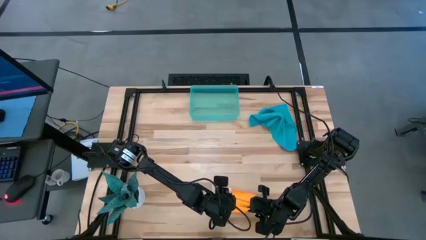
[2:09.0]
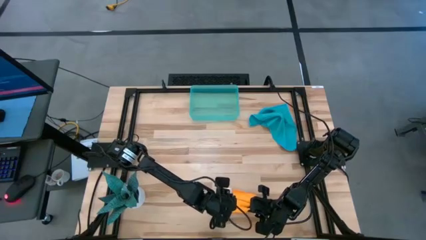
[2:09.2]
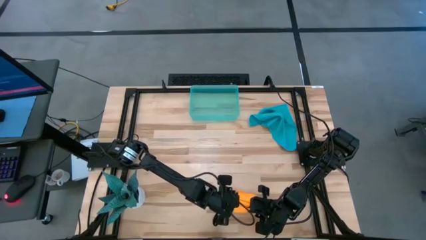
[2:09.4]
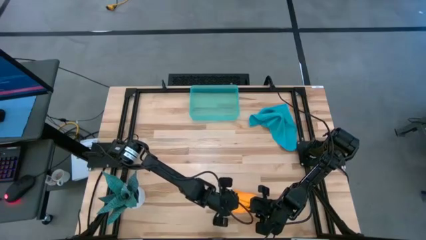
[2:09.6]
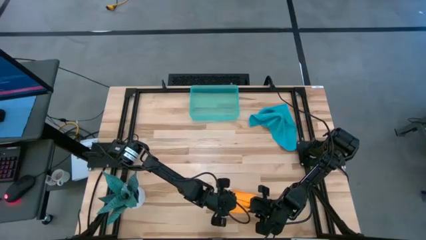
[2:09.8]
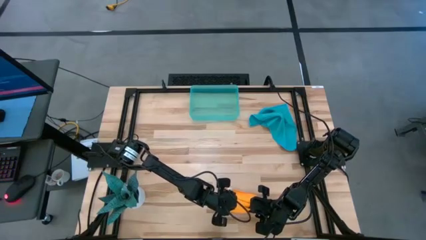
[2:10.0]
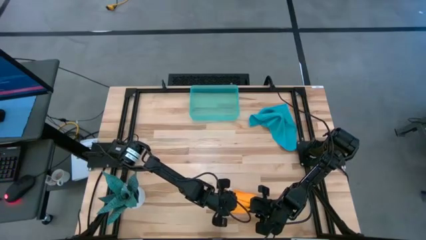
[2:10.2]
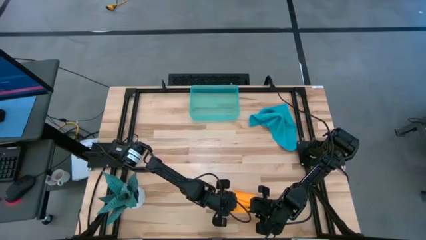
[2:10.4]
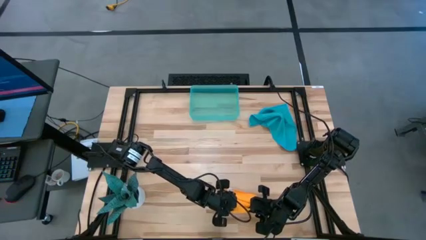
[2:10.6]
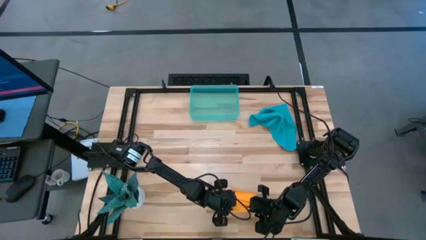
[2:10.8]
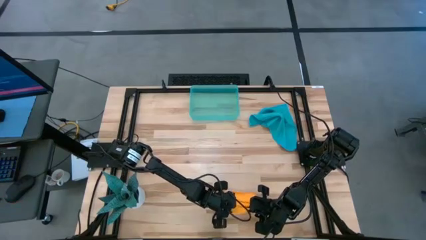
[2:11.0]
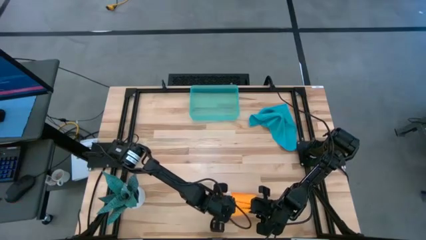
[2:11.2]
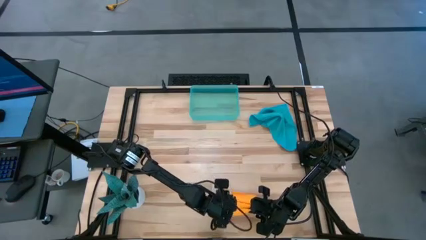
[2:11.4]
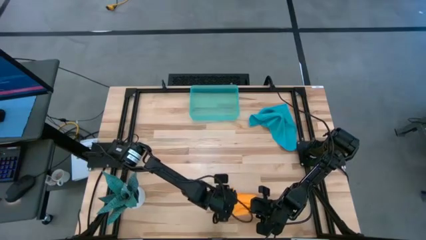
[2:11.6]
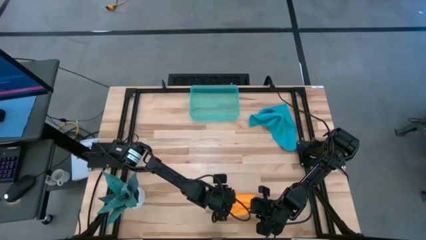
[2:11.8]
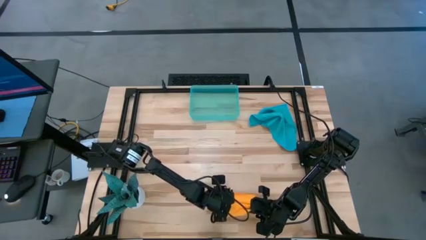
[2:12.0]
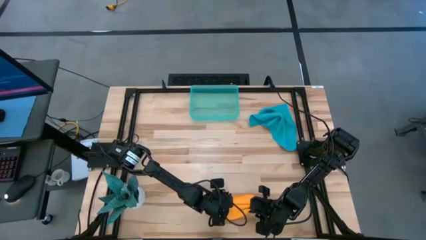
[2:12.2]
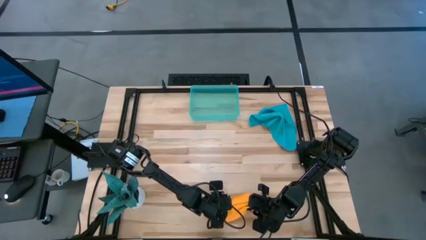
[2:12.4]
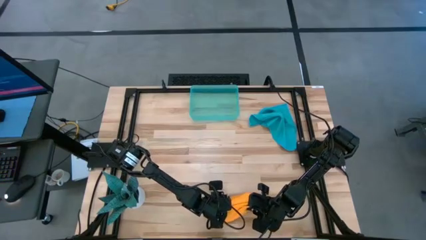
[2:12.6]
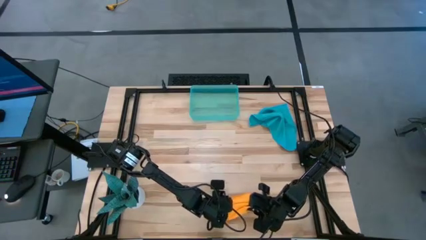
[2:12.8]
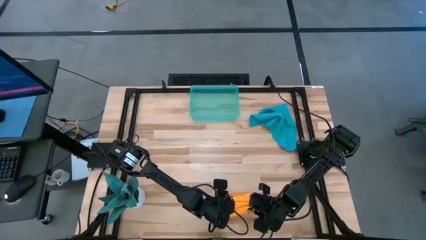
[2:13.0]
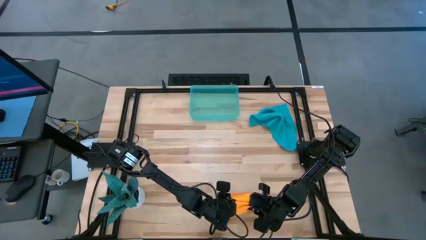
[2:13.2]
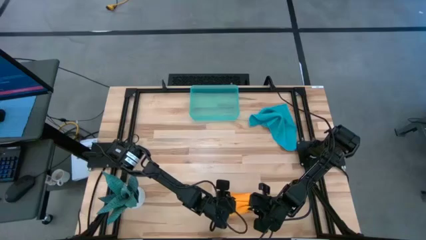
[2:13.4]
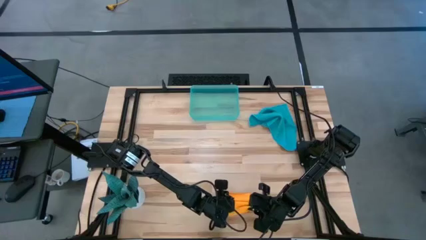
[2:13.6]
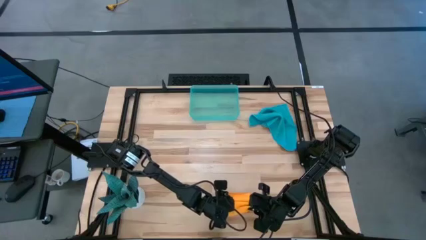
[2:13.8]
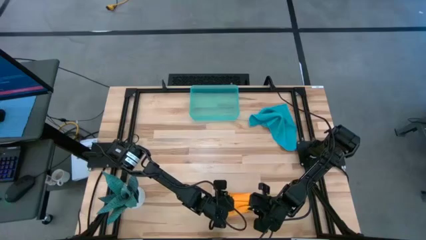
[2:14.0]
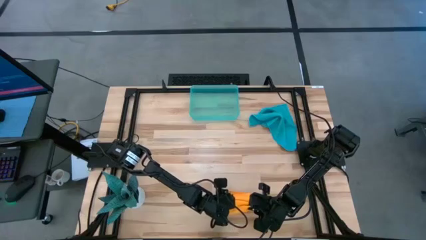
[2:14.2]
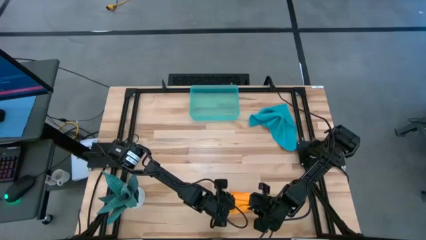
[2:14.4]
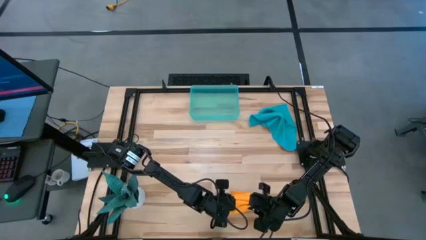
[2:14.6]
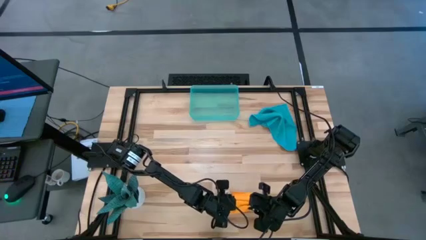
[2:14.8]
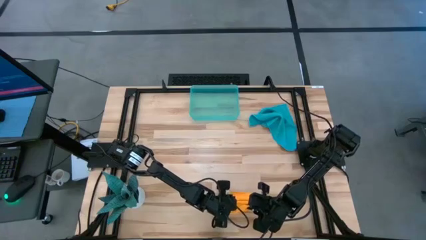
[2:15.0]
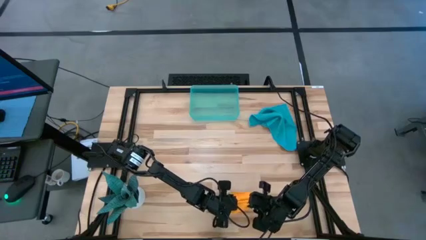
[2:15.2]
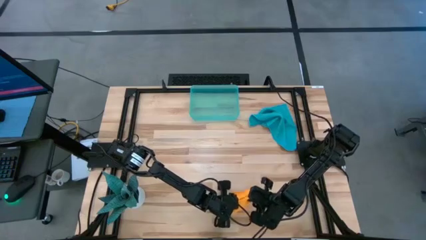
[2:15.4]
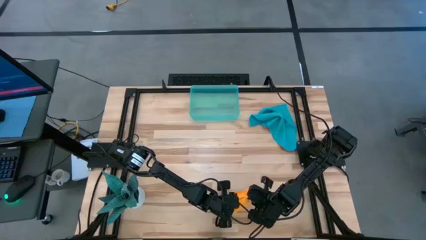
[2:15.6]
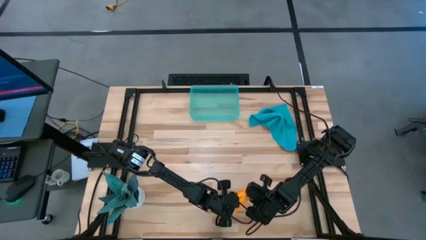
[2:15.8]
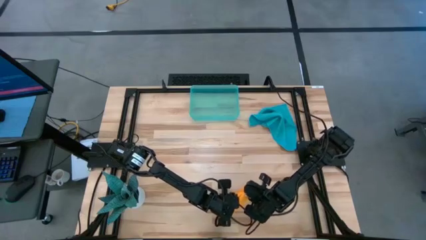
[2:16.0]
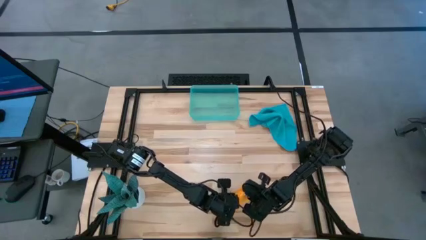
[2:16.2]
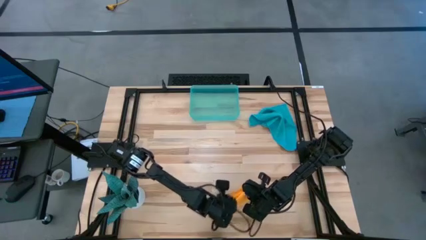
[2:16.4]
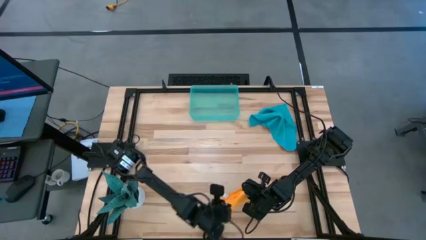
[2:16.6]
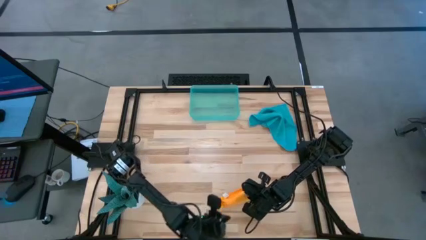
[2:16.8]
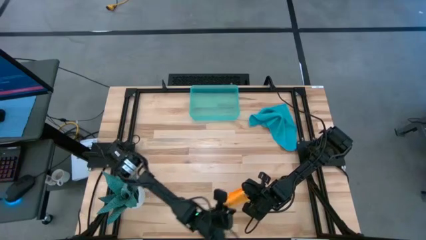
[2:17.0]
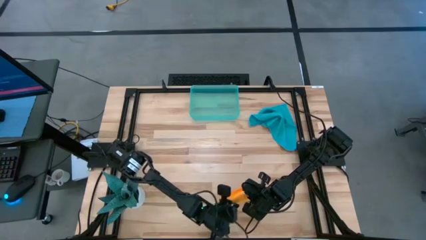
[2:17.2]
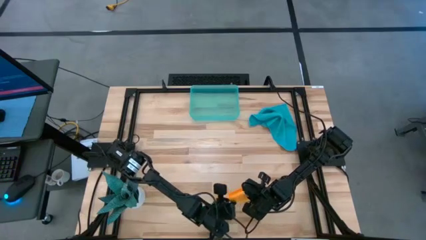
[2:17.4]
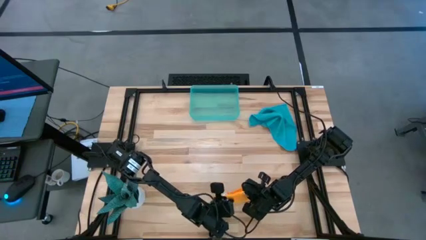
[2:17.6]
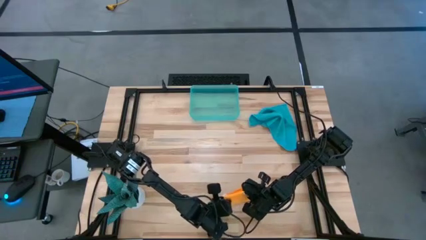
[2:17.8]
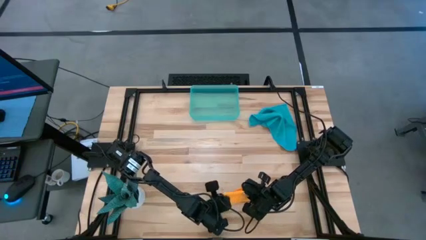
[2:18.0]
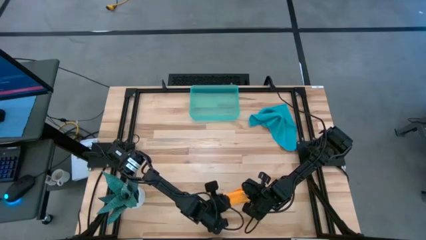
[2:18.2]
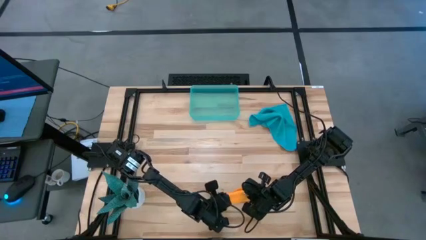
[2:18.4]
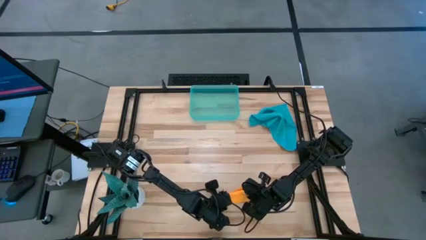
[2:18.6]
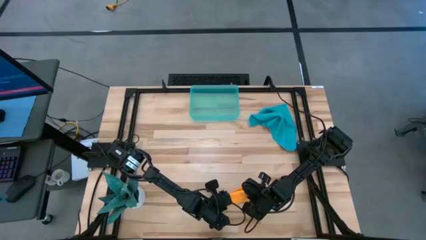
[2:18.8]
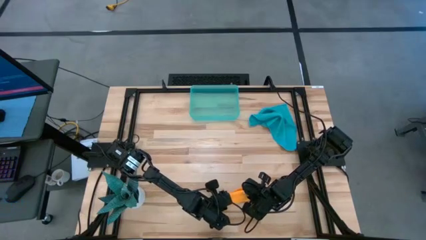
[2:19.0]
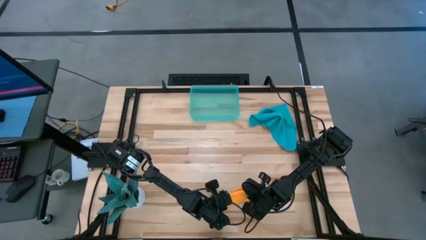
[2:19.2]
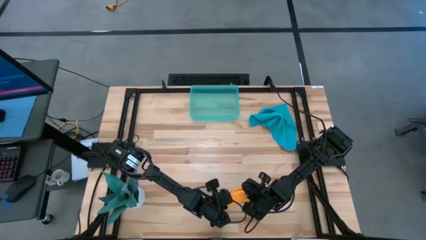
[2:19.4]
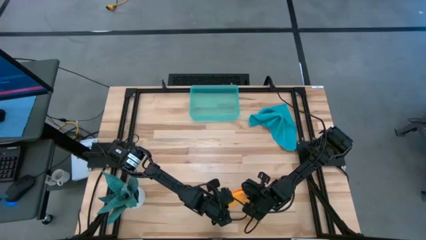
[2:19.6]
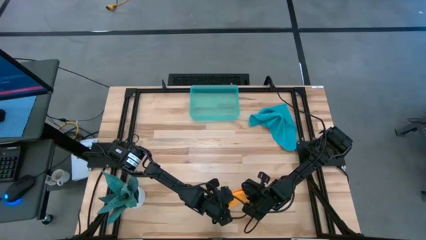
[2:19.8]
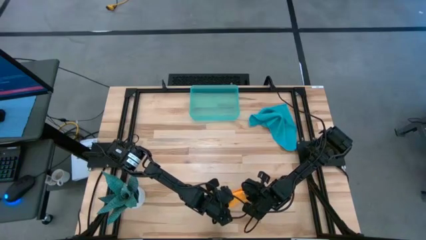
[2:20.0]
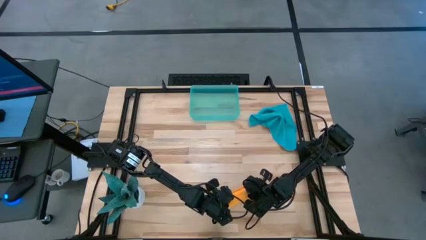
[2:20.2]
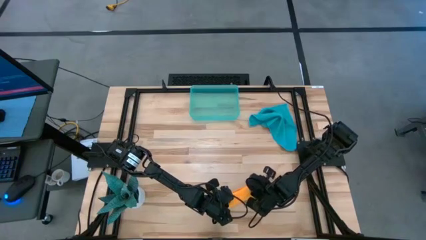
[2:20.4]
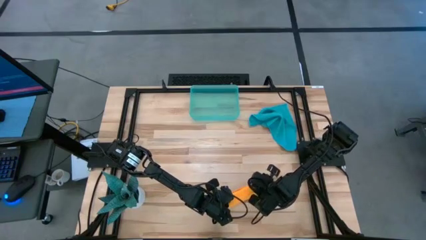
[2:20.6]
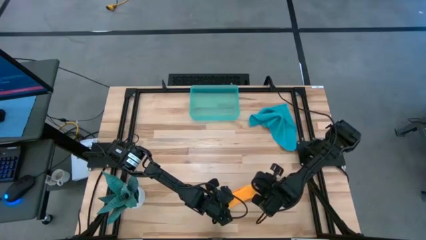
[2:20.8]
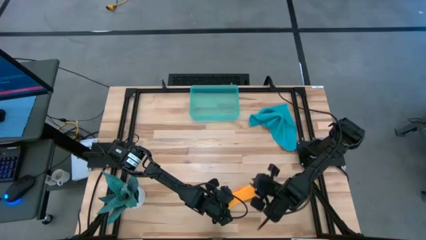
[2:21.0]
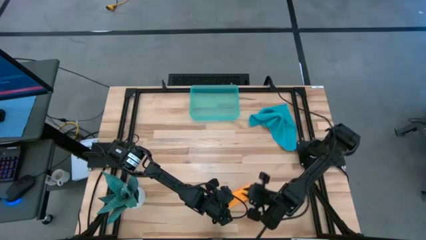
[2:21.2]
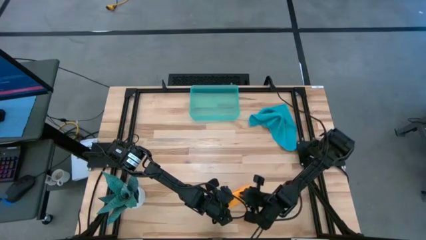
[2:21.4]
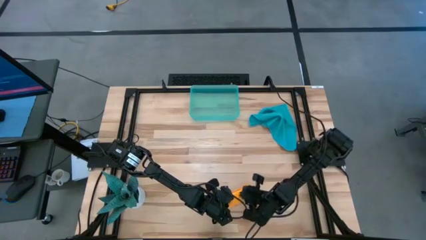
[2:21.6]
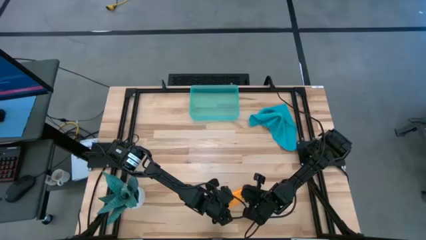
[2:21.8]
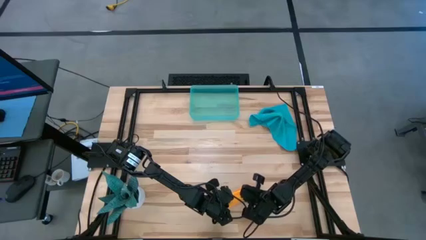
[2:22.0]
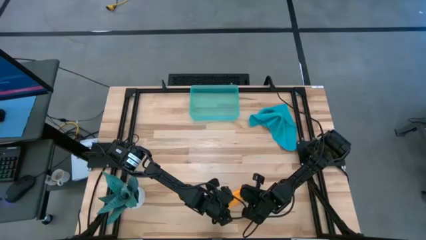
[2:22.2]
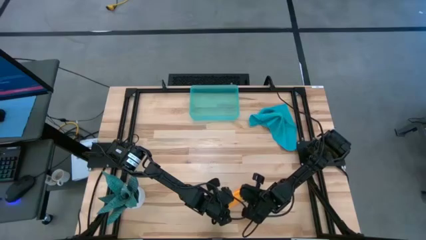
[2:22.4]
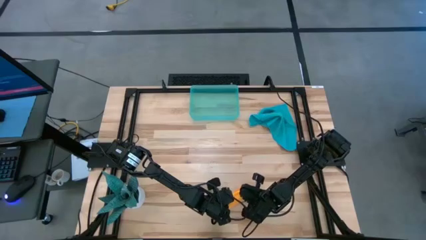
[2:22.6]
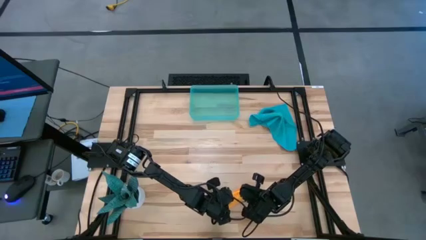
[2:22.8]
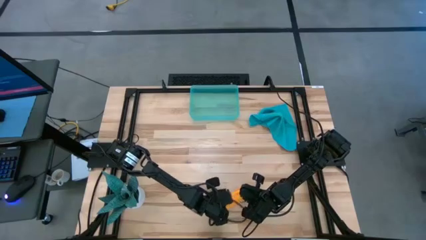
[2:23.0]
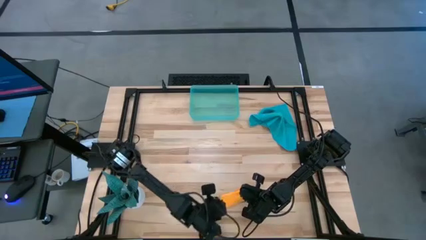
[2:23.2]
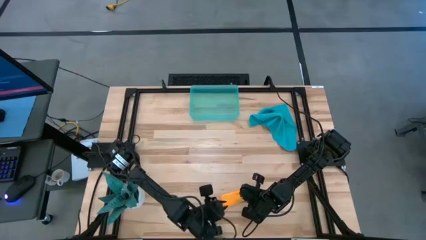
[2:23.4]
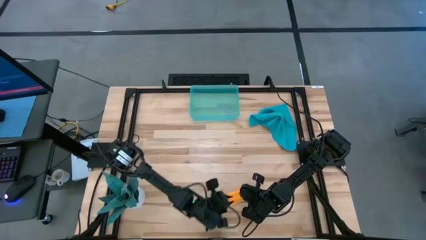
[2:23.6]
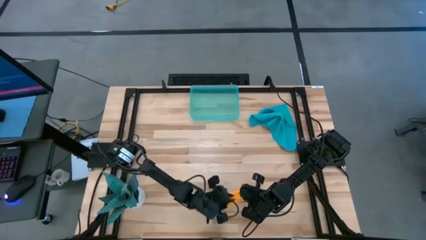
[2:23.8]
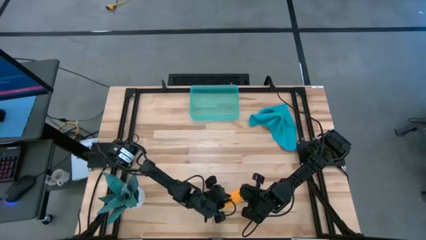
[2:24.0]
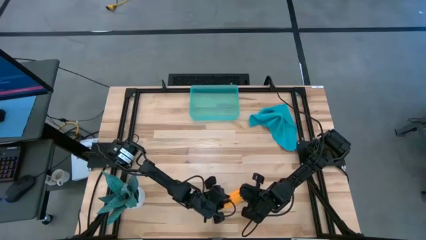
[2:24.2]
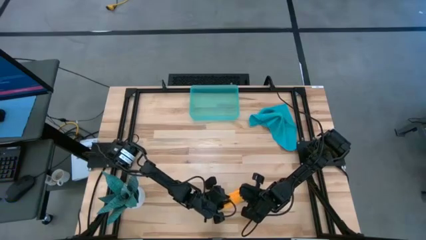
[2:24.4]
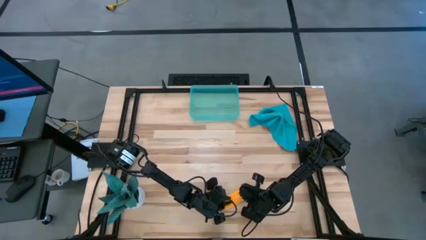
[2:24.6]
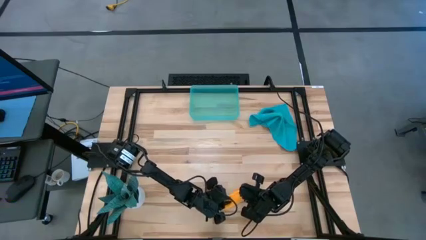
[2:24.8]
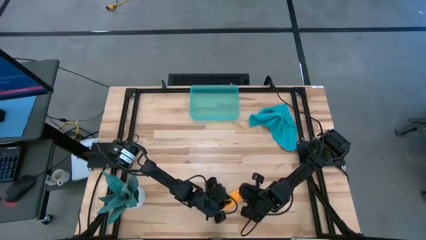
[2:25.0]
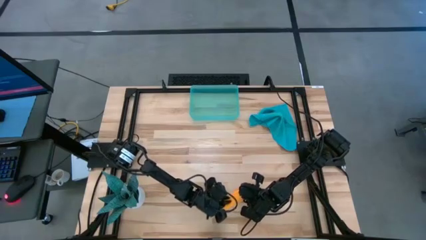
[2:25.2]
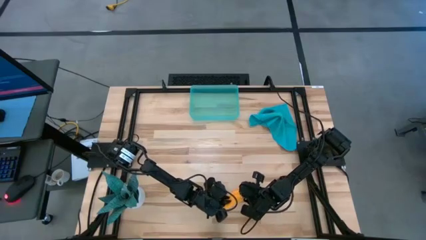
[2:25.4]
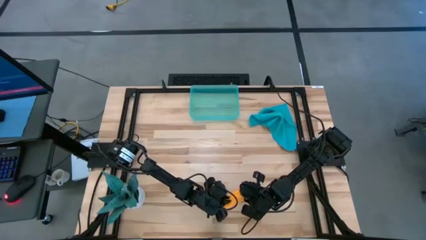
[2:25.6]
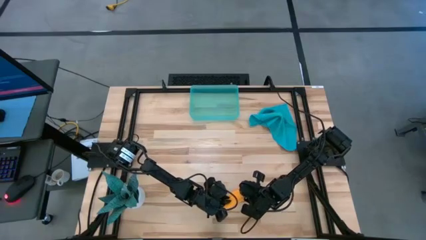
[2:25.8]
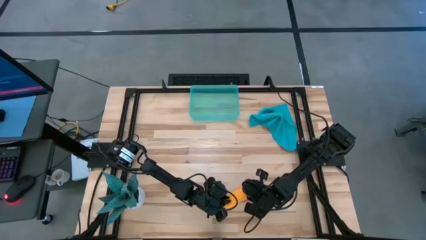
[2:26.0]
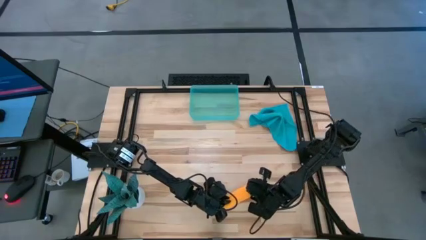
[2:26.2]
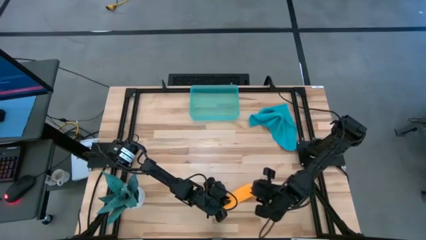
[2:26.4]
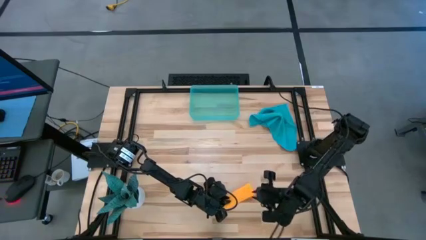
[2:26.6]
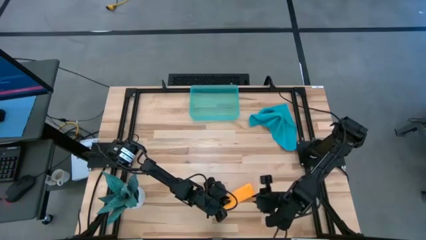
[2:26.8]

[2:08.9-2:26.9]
Task: Roll microfiber towels into tight, uniform cylinder then place into a basket
Roll the yellow microfiber cloth on the table
